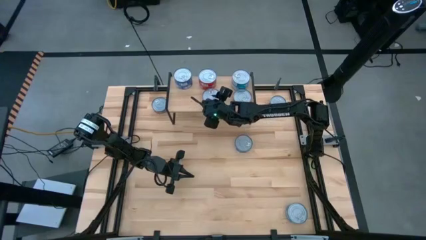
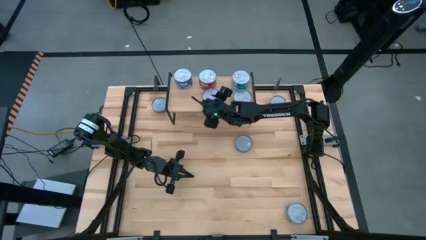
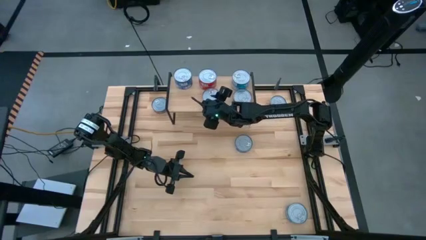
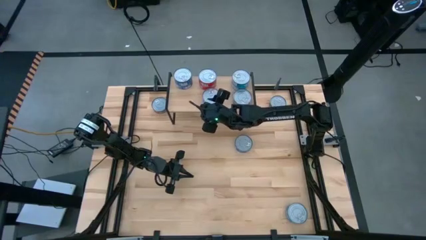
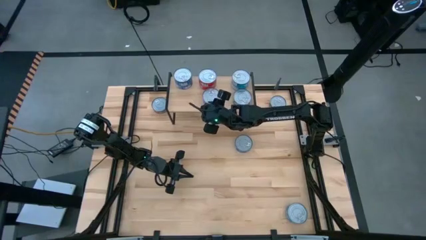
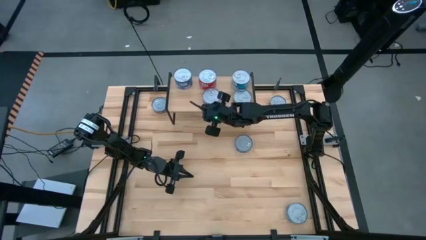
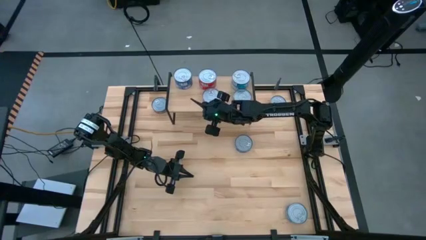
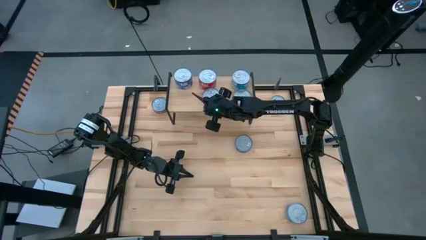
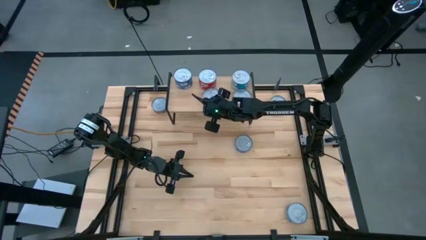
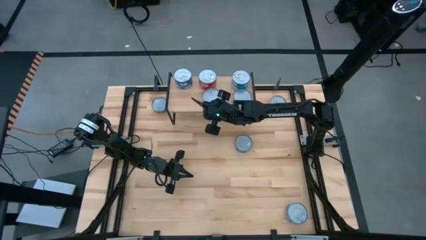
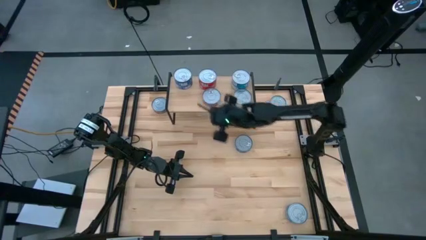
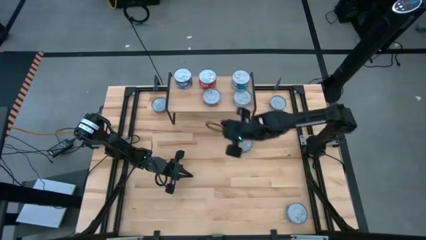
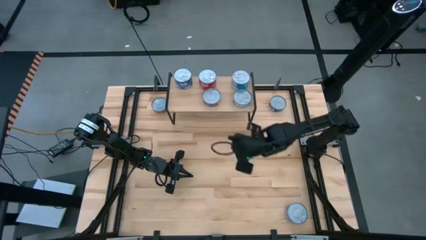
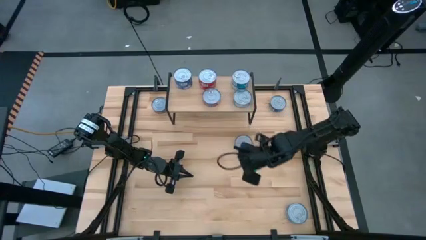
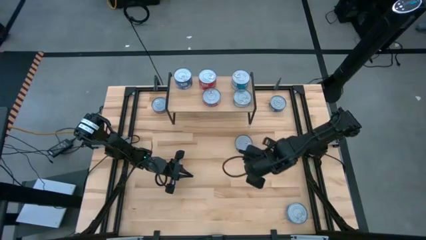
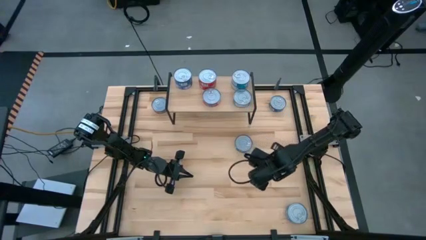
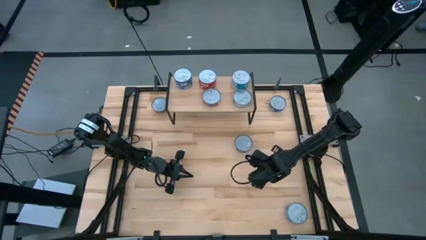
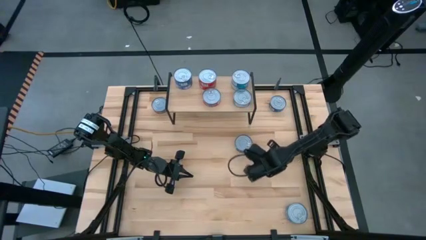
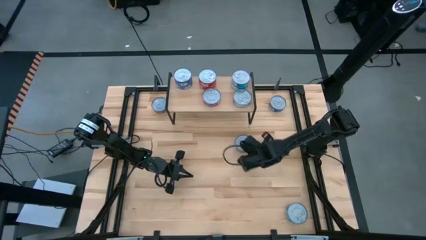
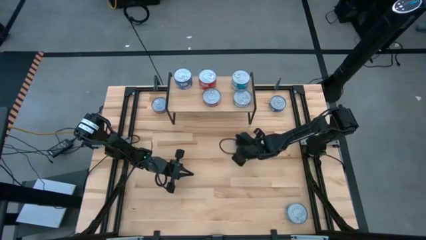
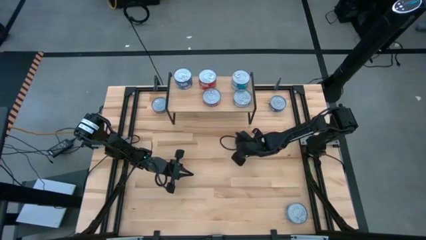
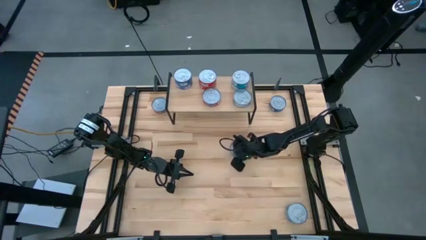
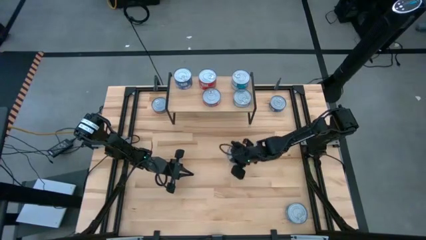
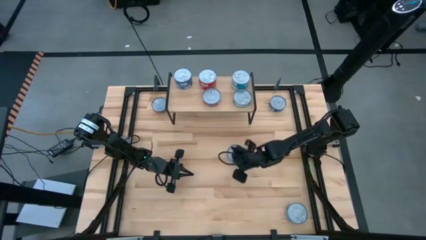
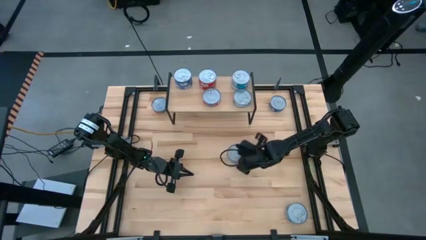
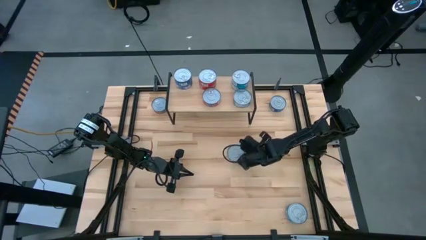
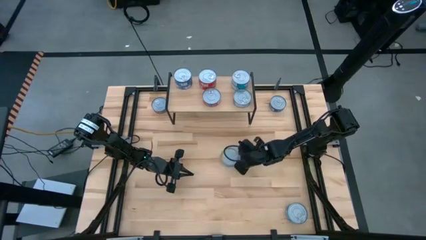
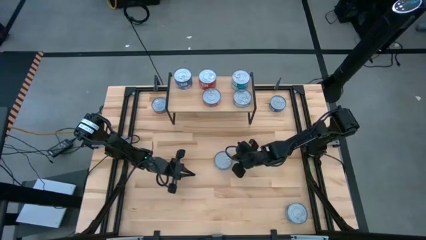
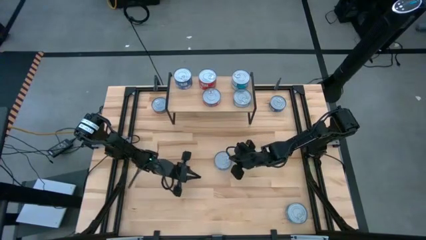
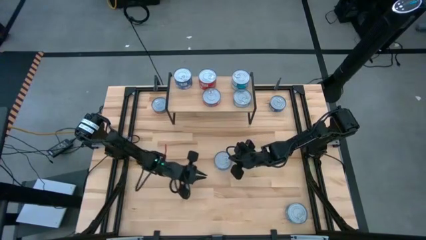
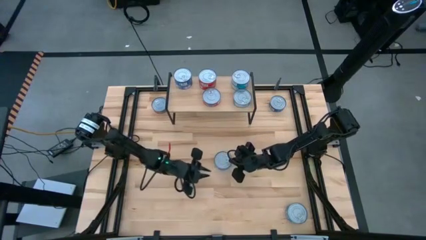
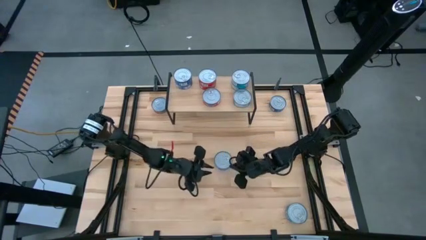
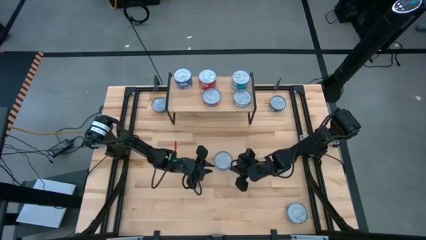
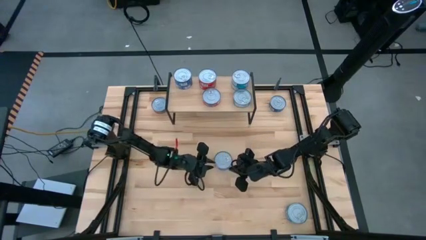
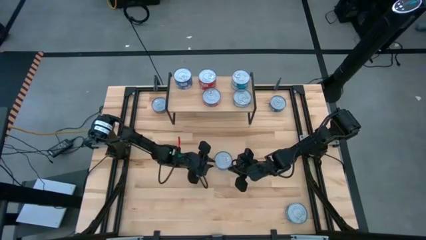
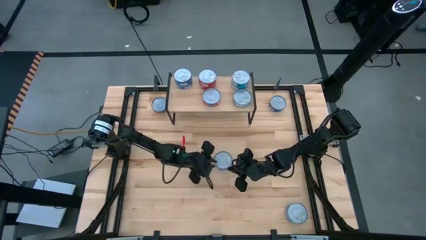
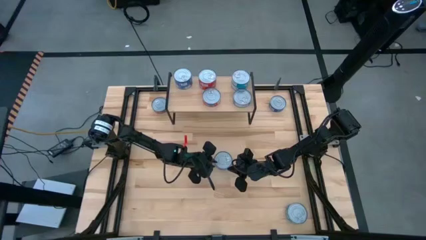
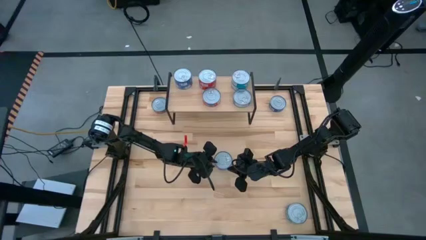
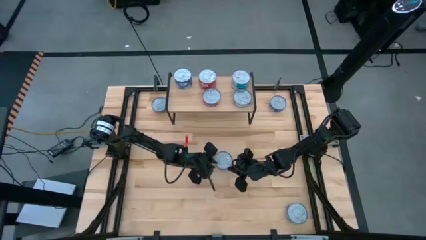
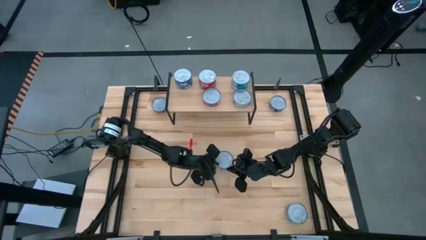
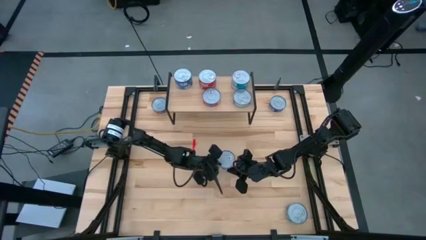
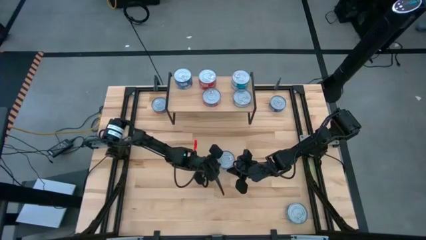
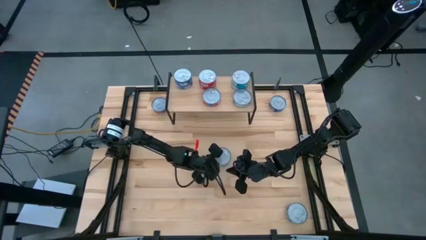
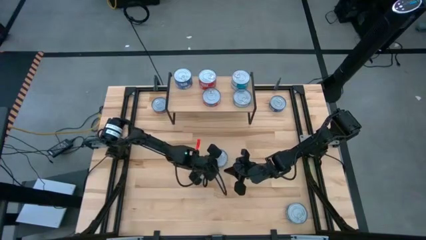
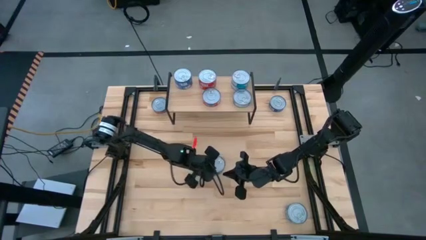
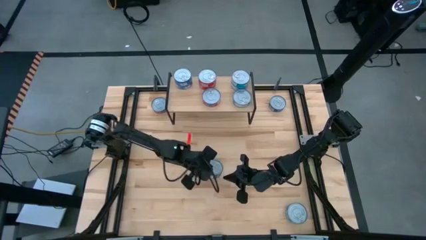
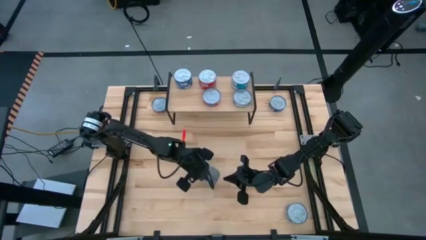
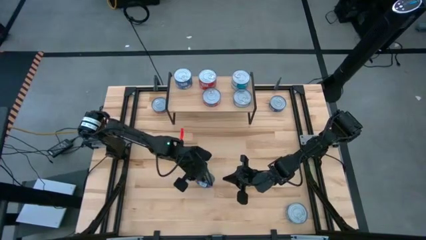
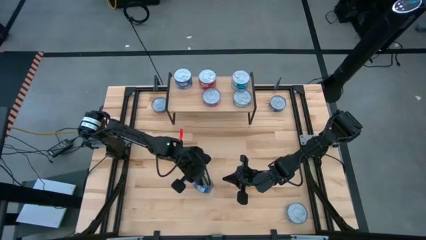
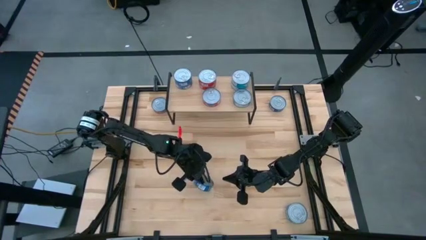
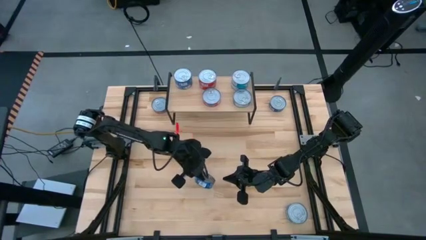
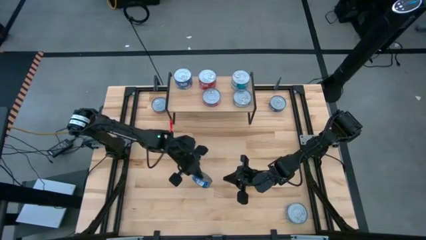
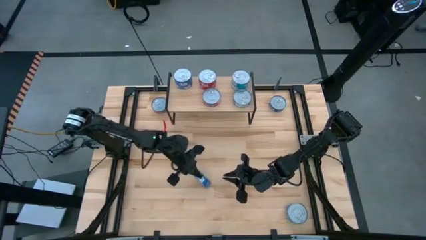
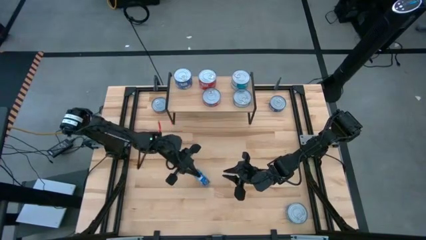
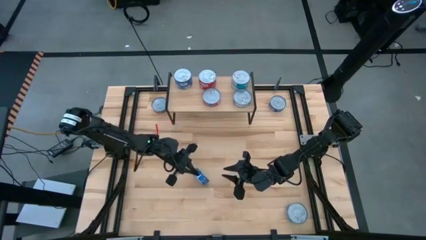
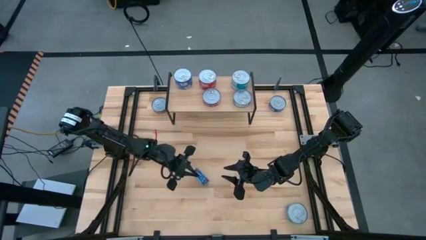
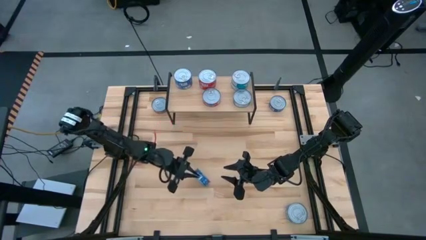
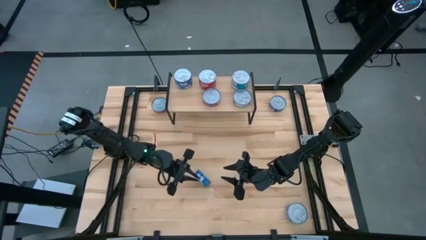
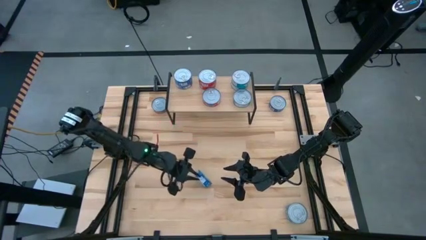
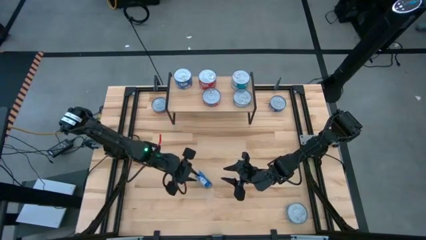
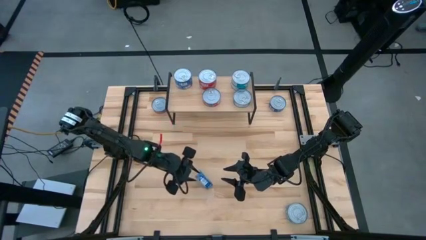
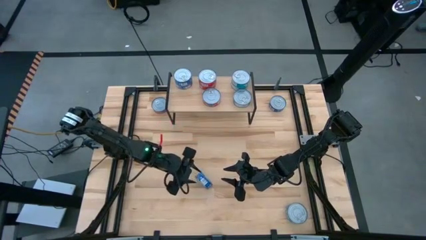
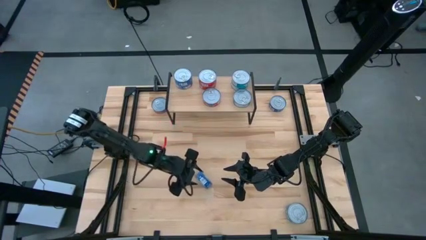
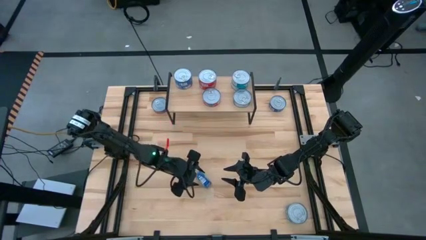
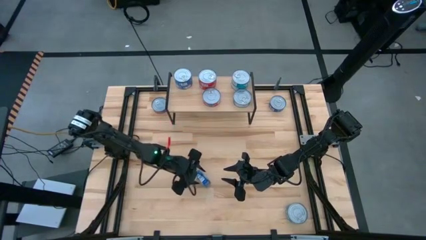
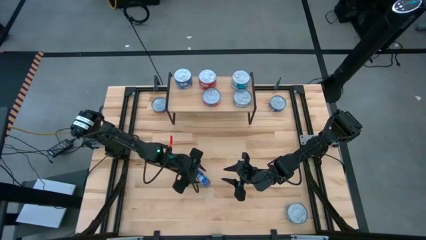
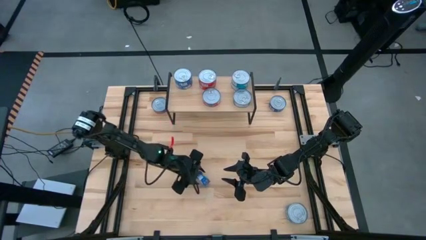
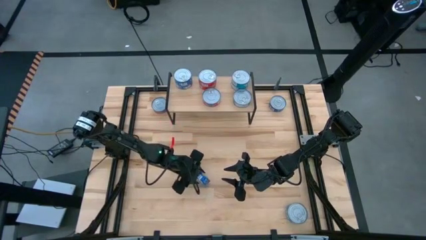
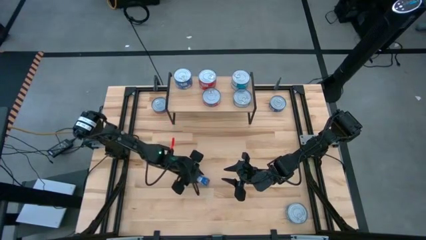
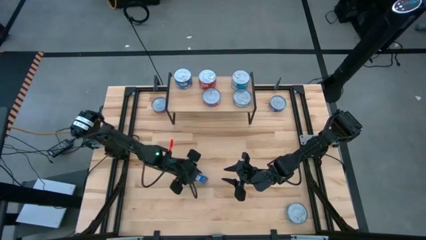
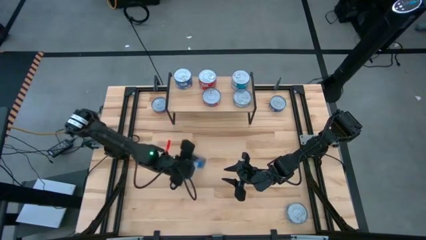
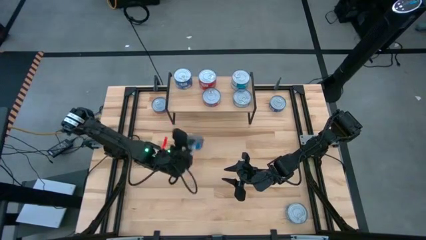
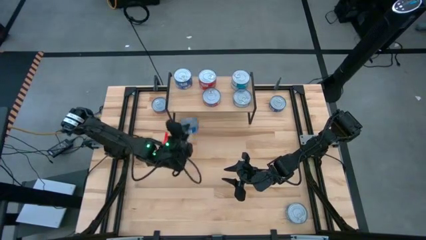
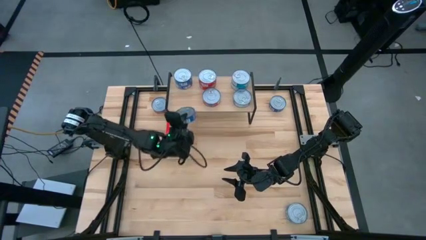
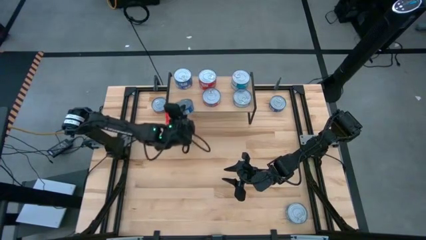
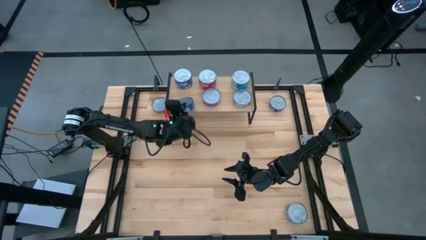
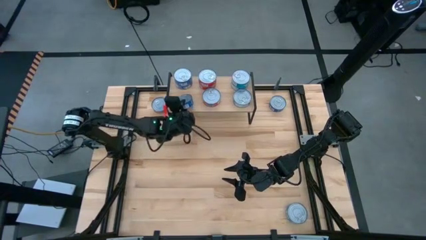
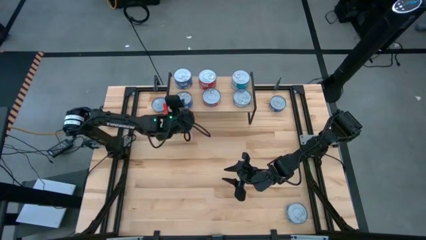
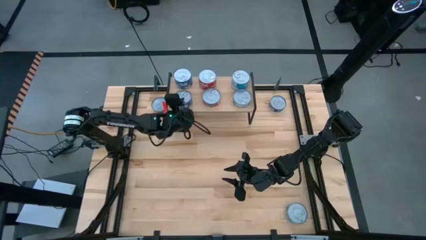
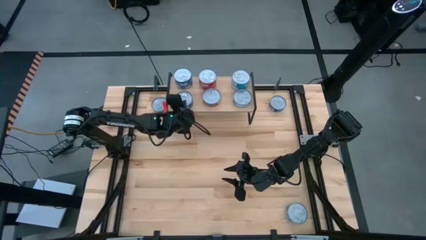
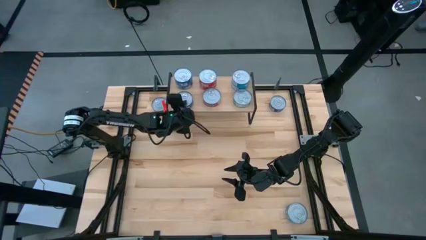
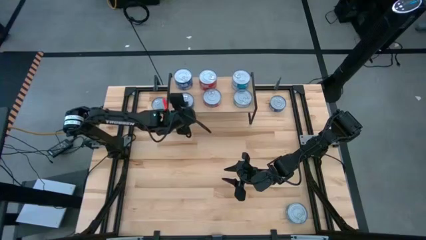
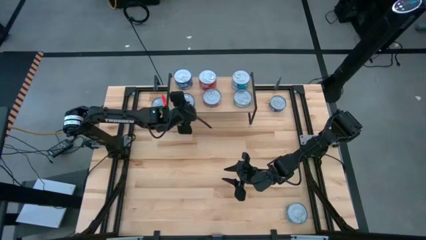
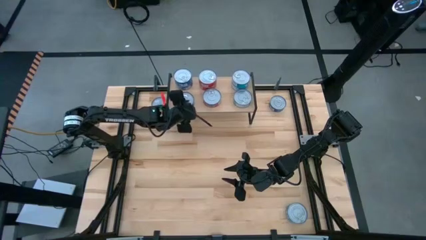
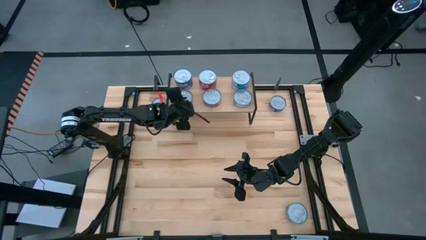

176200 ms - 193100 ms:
Task: Stack canned seafood by type on shelf
Put the blue tuna can on the shelf aligned with the other blue tuna cans
